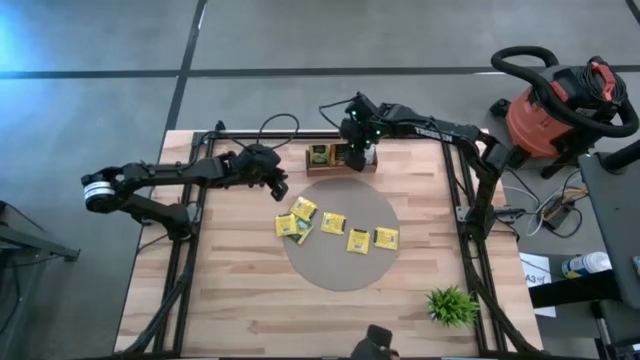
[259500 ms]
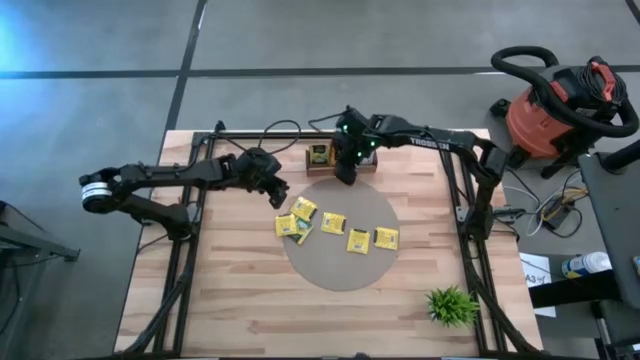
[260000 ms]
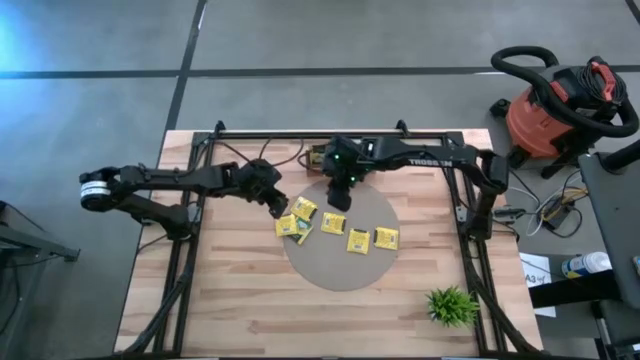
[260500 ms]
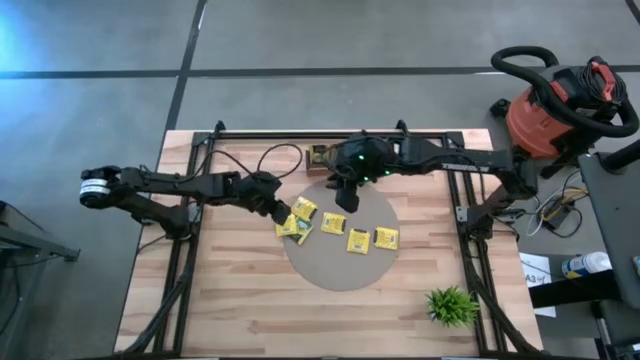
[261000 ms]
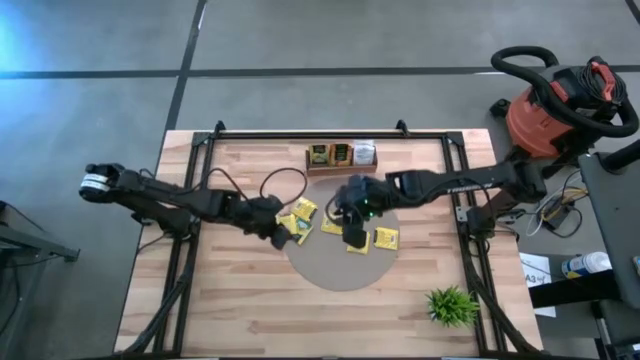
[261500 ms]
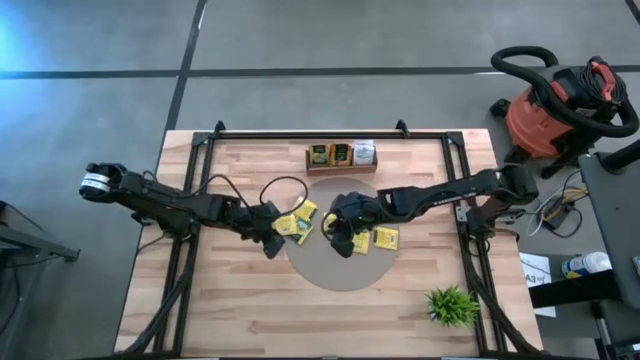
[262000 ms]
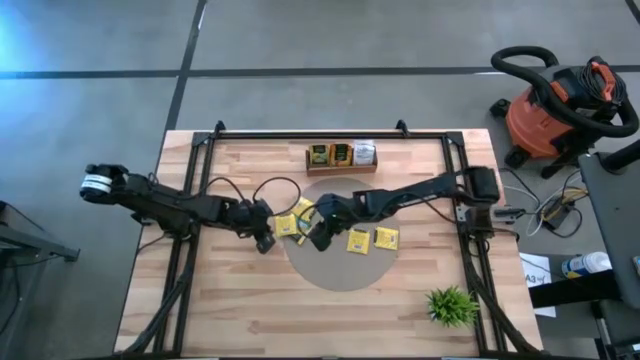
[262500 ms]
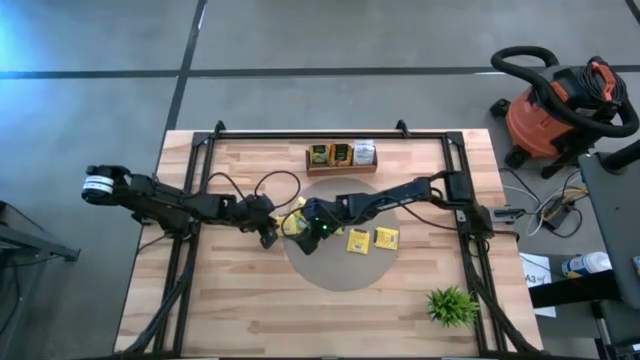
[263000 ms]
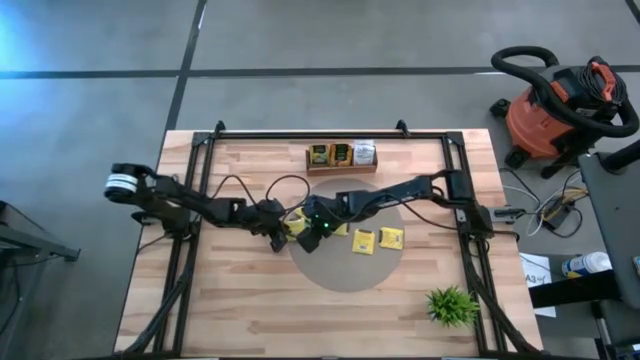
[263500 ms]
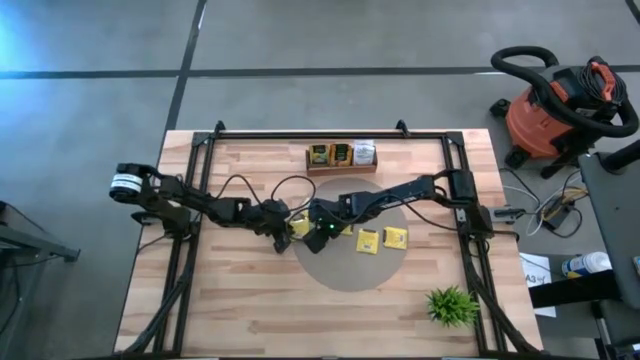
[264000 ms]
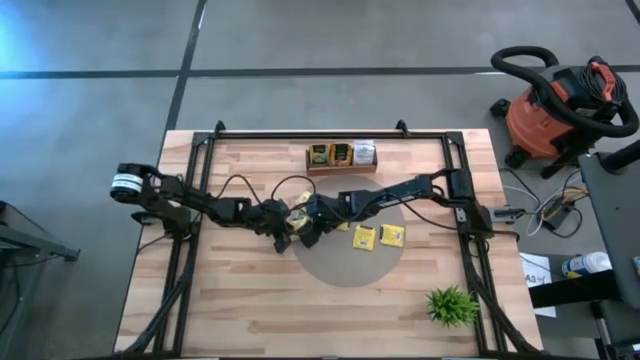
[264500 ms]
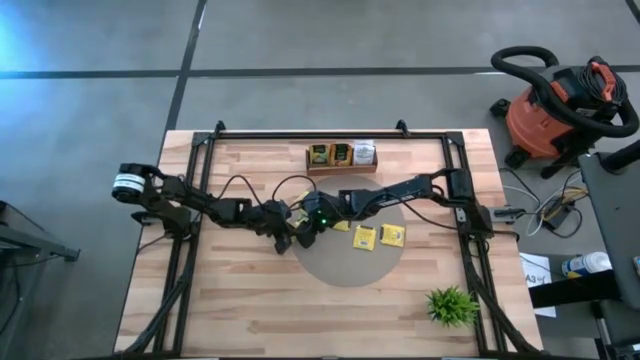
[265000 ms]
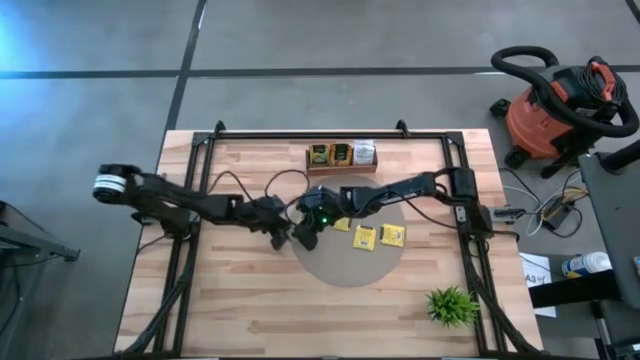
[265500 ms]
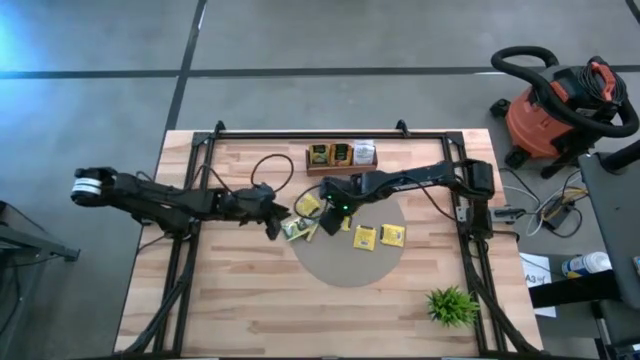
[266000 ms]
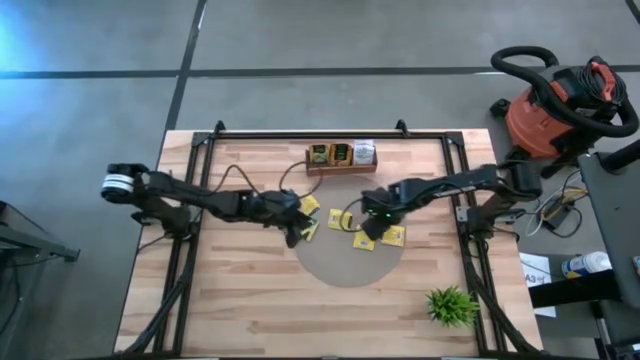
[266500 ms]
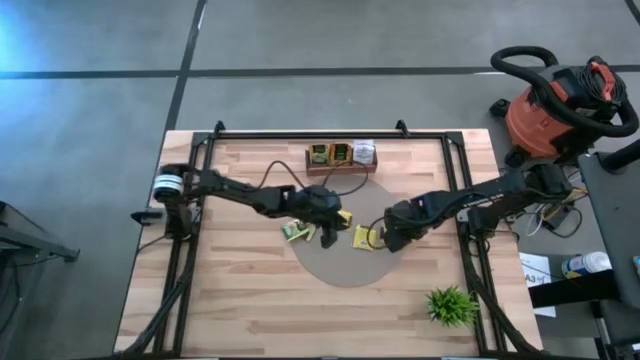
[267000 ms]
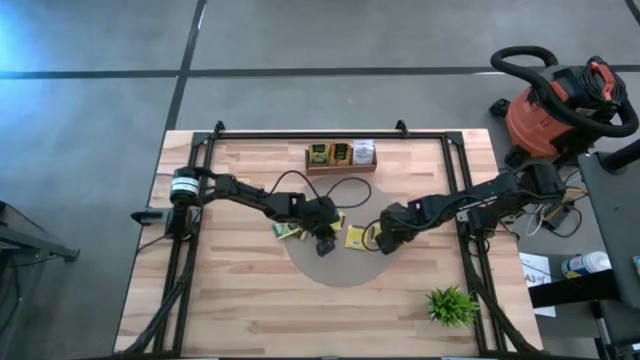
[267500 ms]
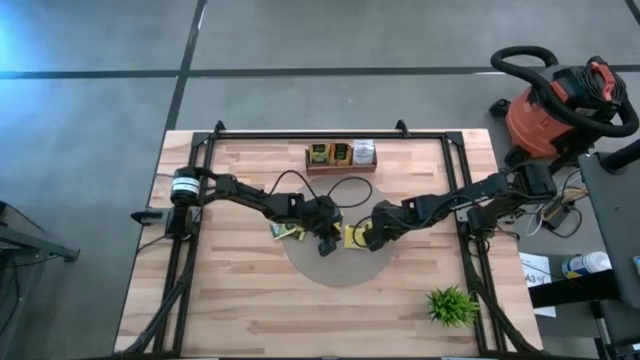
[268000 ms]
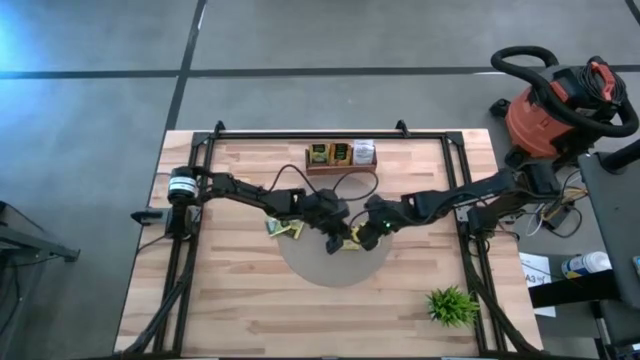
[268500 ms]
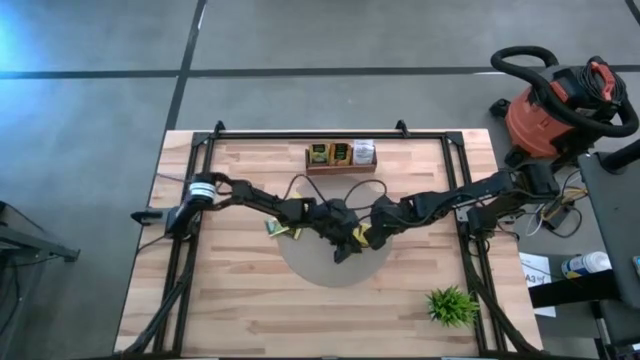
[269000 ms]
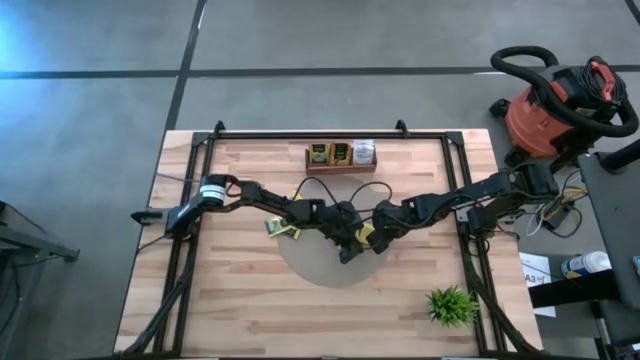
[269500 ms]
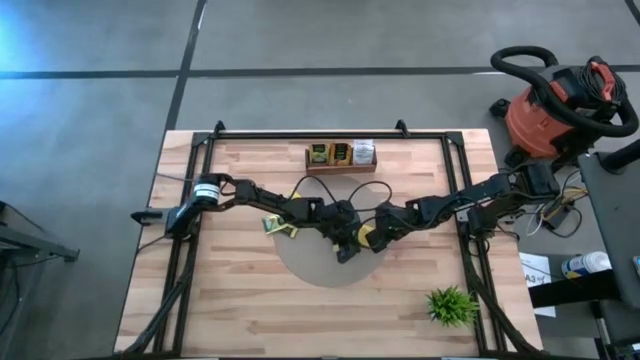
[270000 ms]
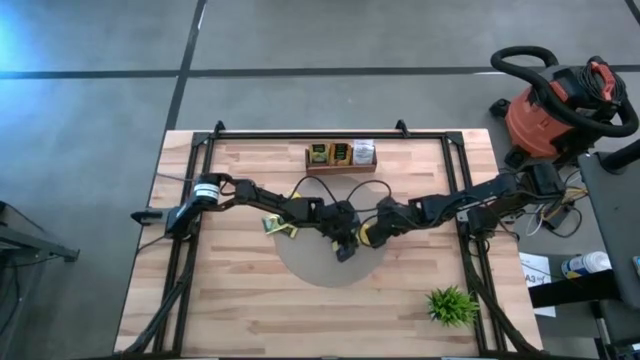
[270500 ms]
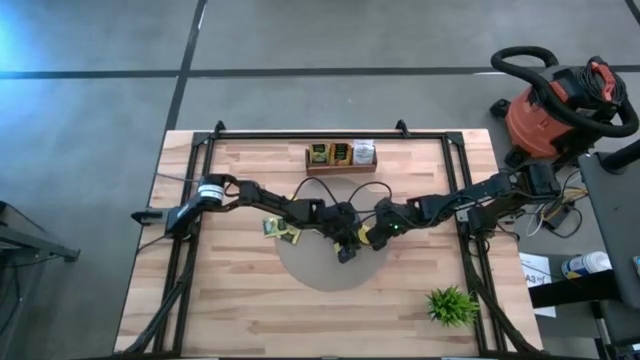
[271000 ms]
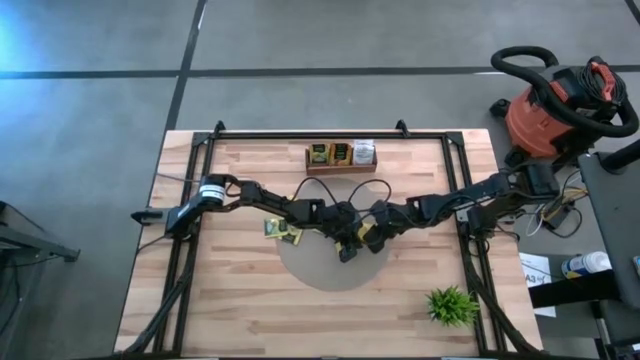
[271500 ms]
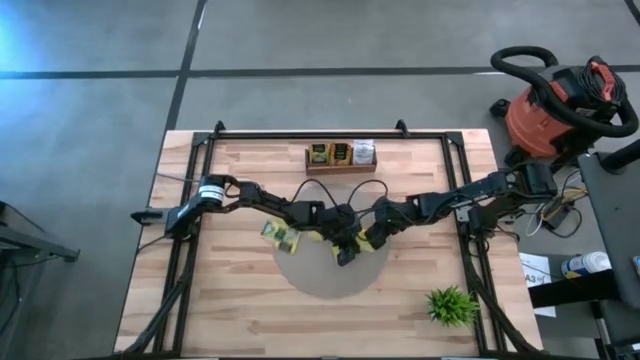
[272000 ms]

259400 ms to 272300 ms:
Task: Pick & Place Tea
Put the yellow tea bag into the left compartment of the wooden organizer

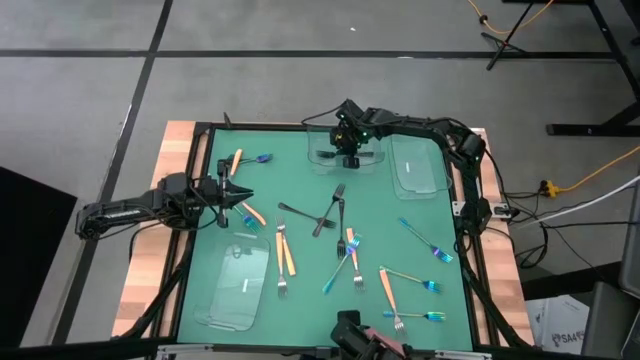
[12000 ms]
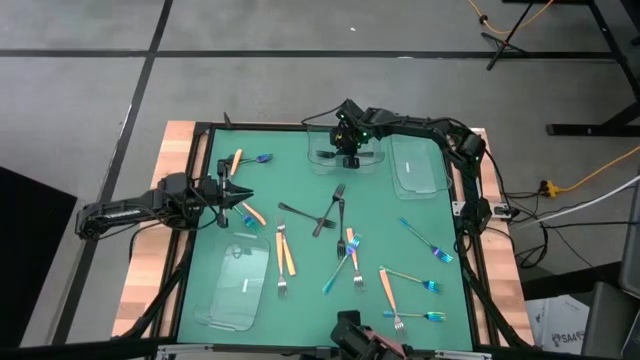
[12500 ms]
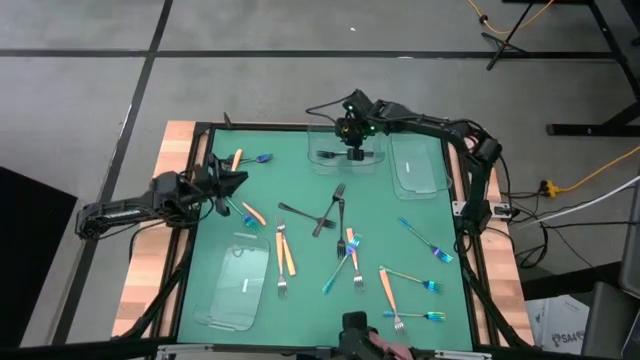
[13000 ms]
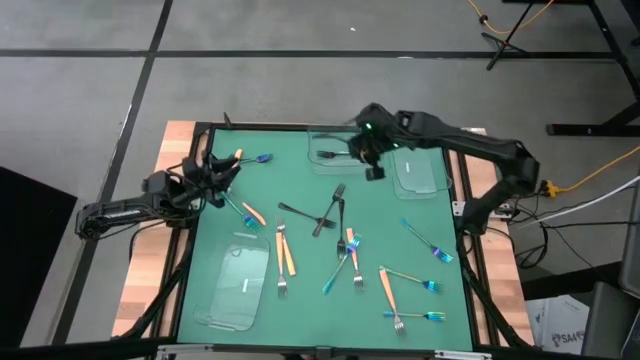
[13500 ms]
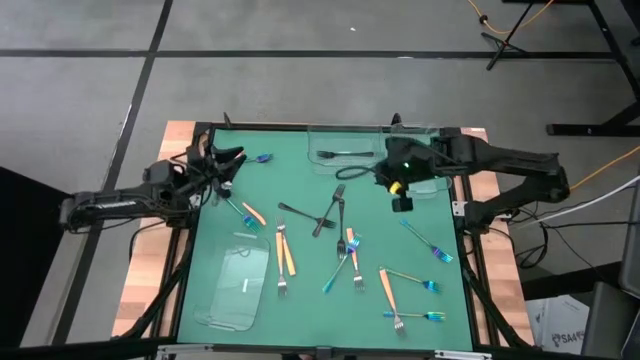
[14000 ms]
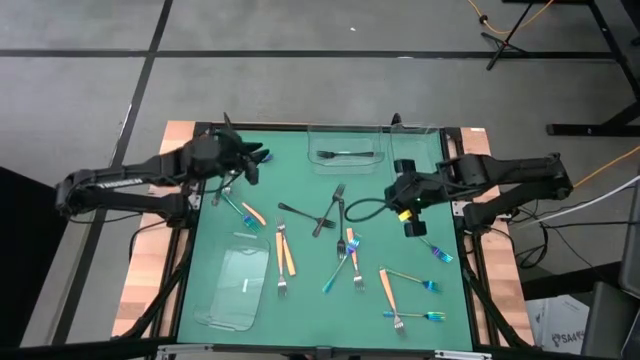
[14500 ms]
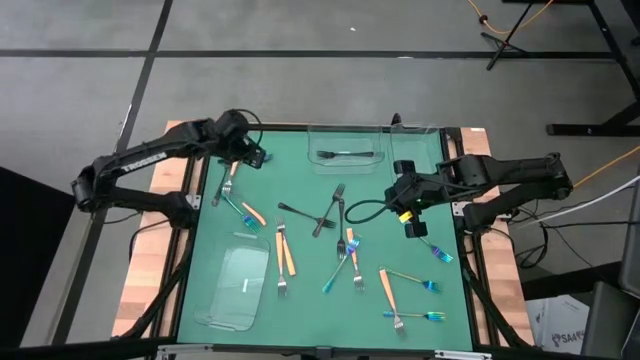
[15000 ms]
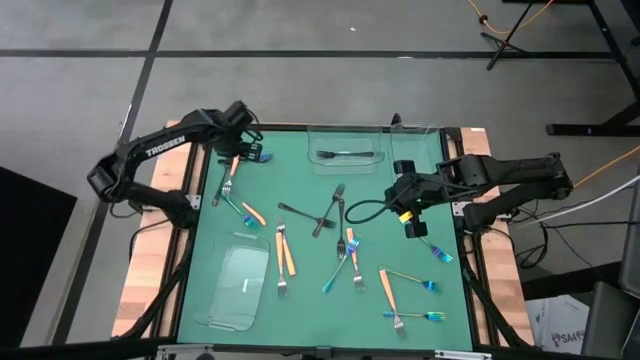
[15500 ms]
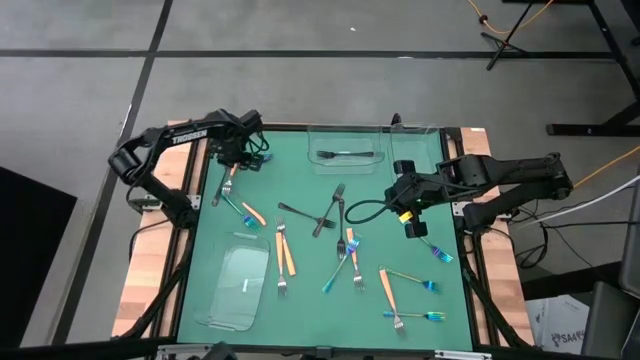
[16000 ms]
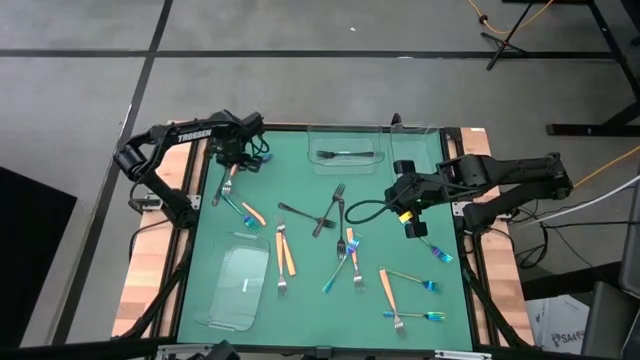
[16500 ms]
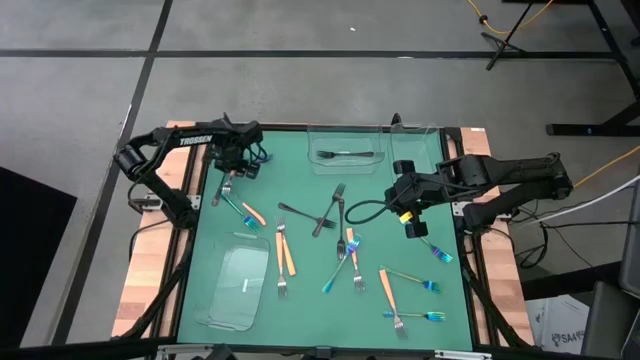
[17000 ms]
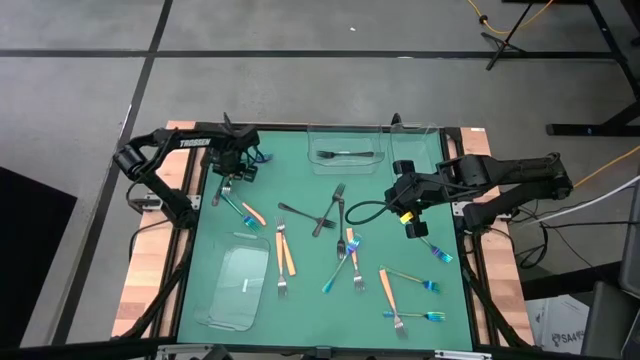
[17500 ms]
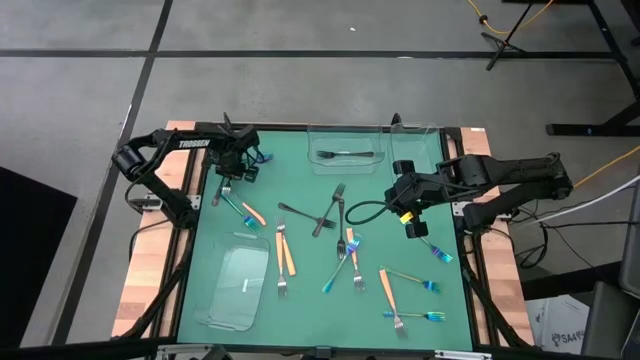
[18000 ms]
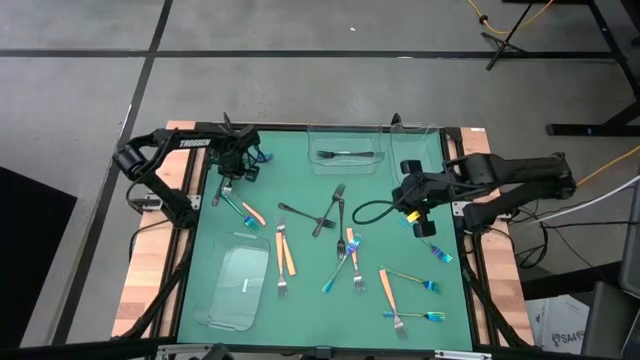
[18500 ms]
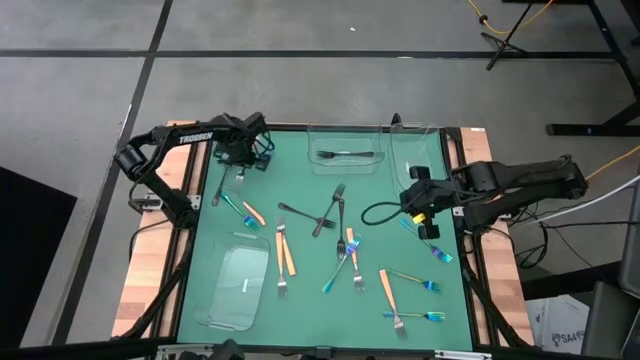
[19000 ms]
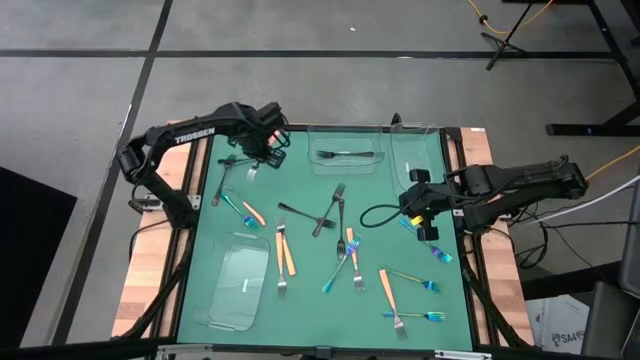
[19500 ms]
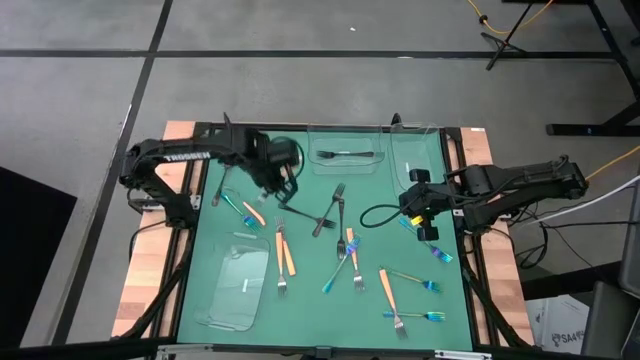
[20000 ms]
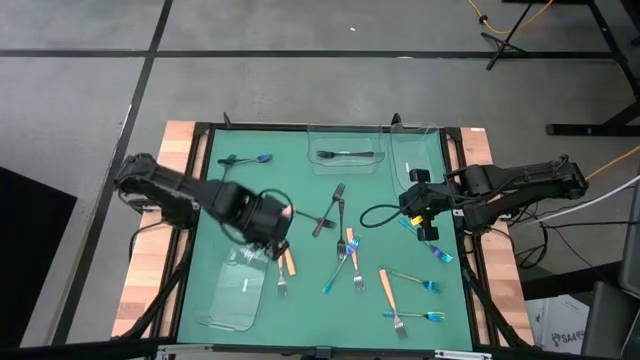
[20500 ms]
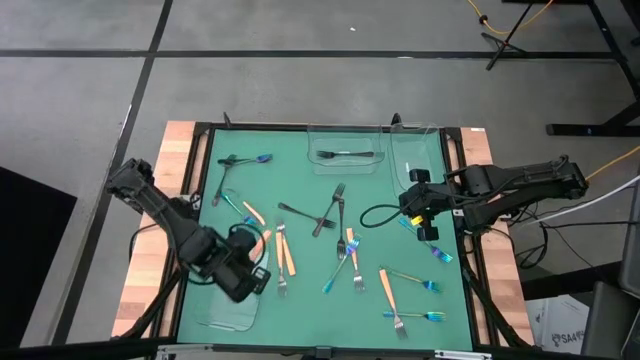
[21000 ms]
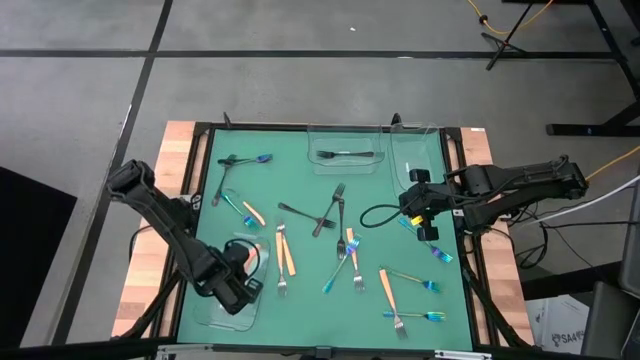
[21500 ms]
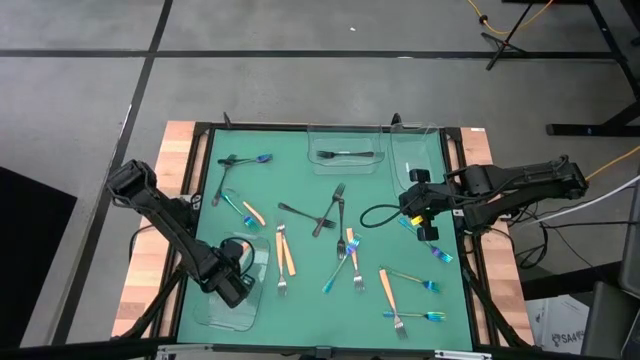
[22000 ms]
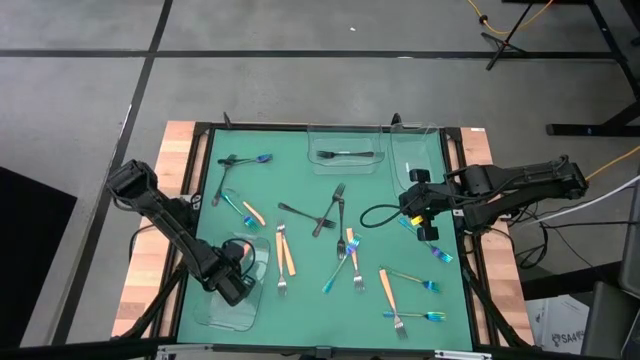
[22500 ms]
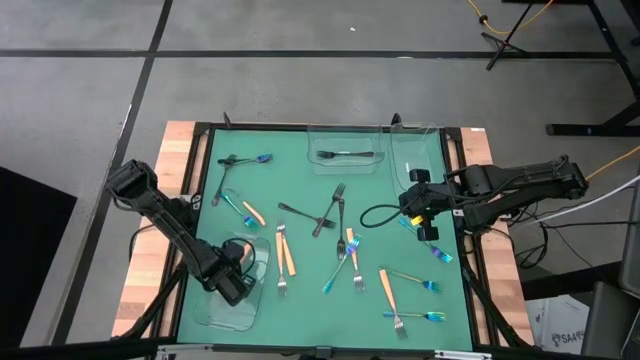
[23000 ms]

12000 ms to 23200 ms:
Task: Sort silverware by color (type)
Put the orange fork into the bottom transparent bin
